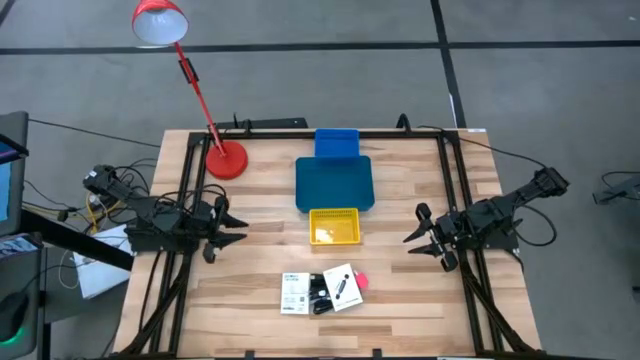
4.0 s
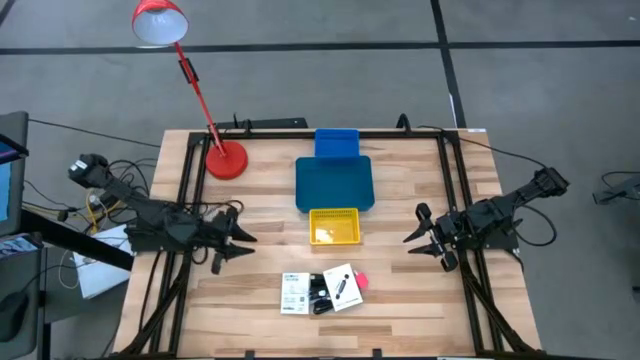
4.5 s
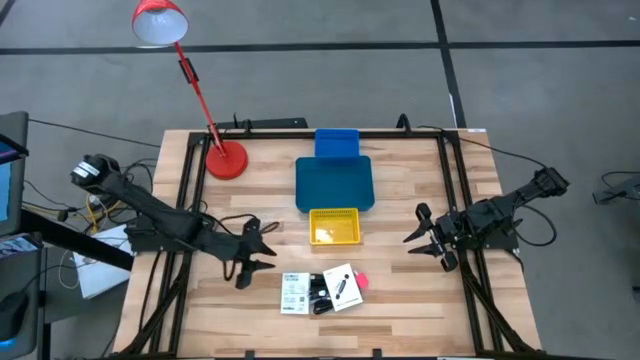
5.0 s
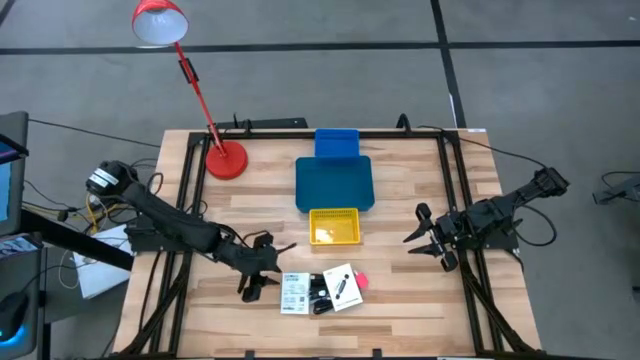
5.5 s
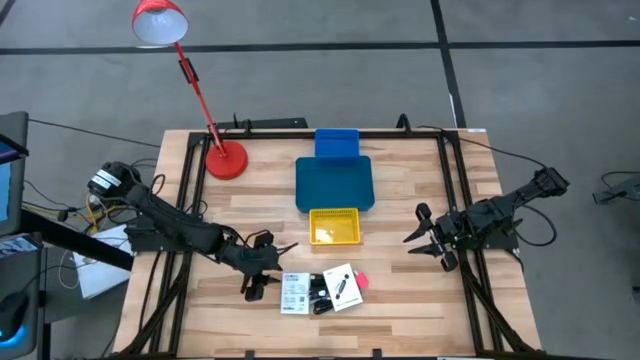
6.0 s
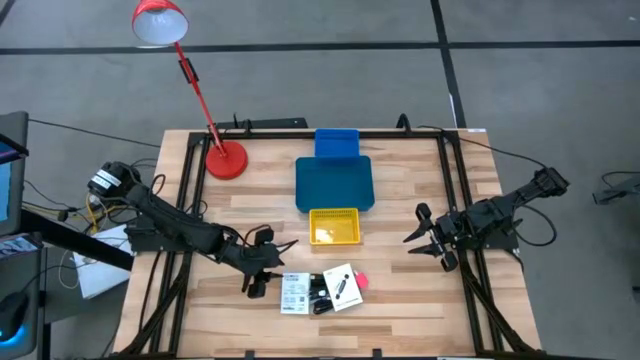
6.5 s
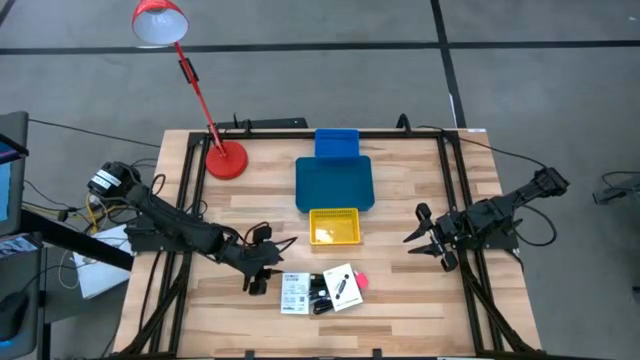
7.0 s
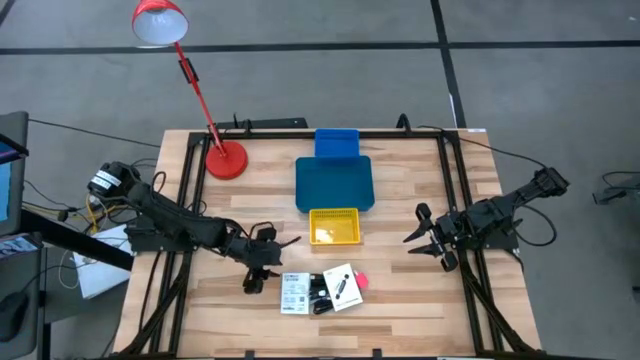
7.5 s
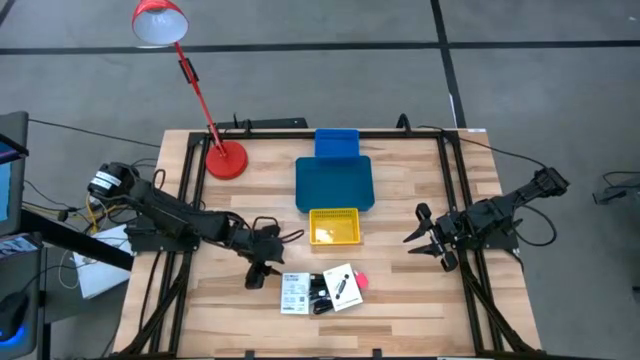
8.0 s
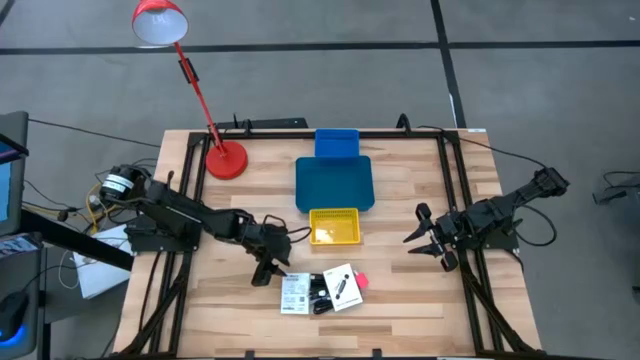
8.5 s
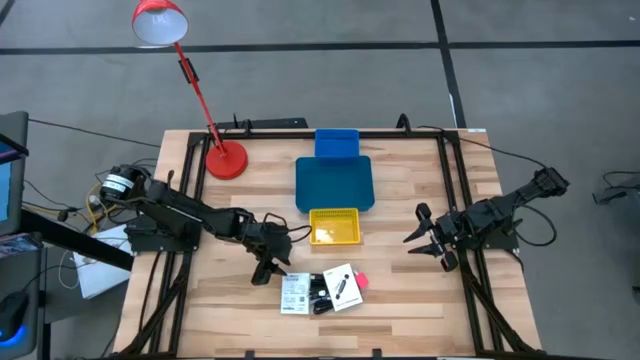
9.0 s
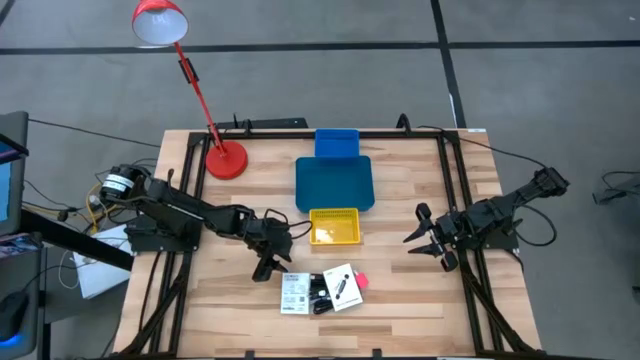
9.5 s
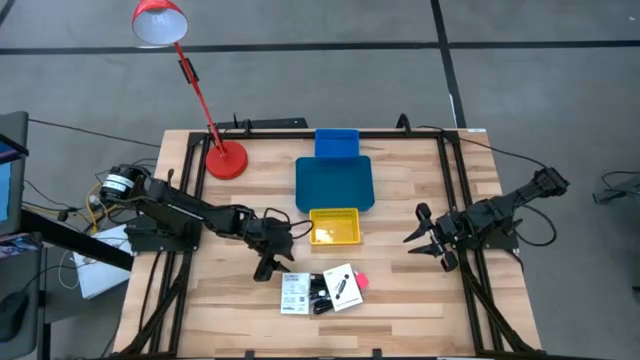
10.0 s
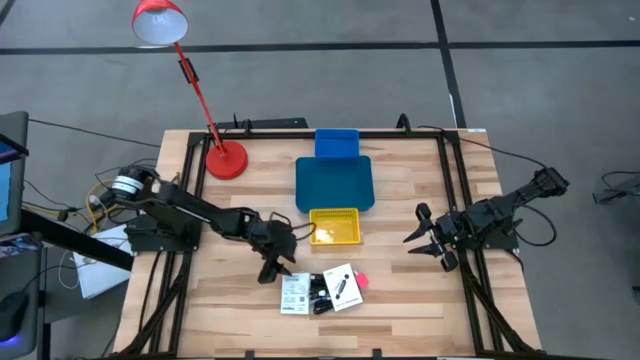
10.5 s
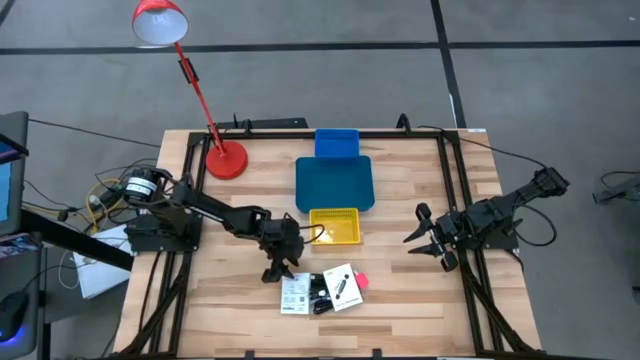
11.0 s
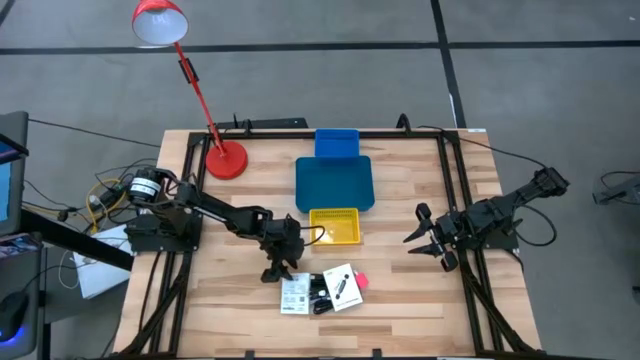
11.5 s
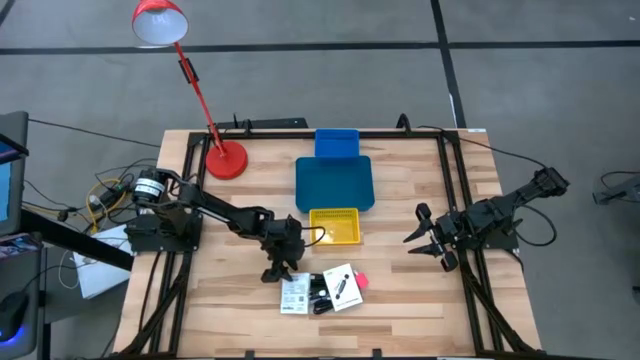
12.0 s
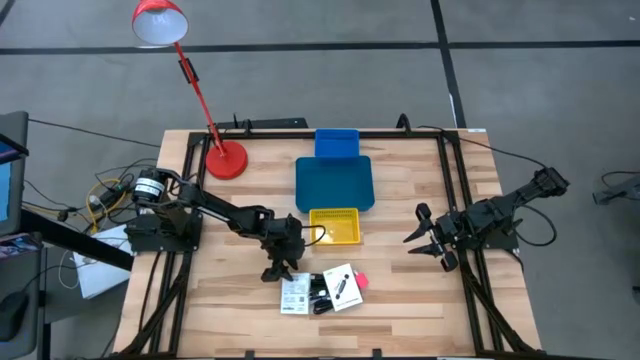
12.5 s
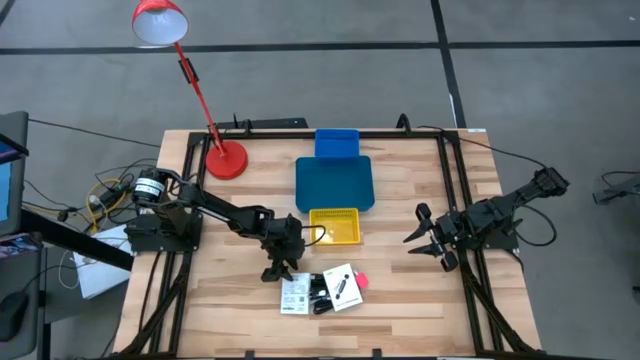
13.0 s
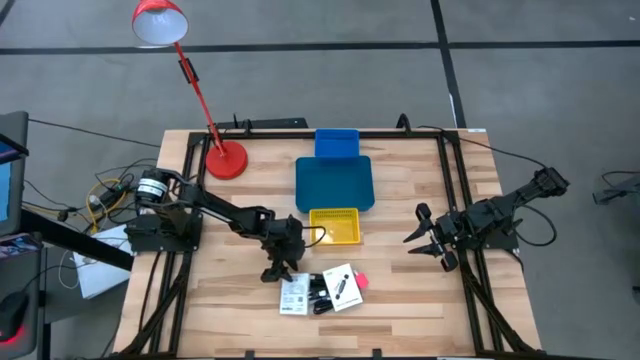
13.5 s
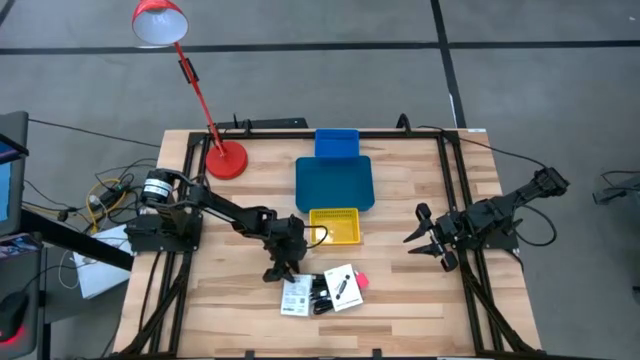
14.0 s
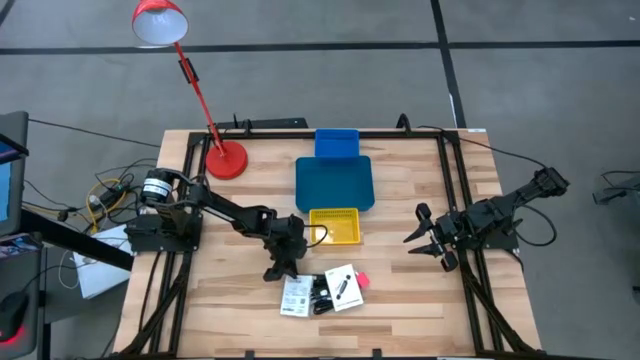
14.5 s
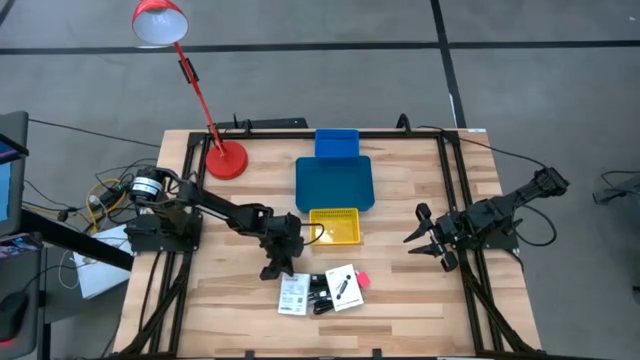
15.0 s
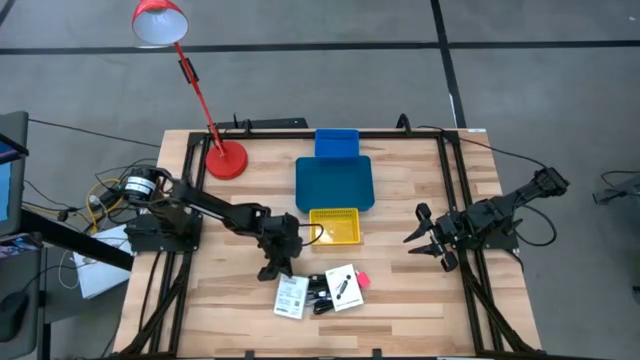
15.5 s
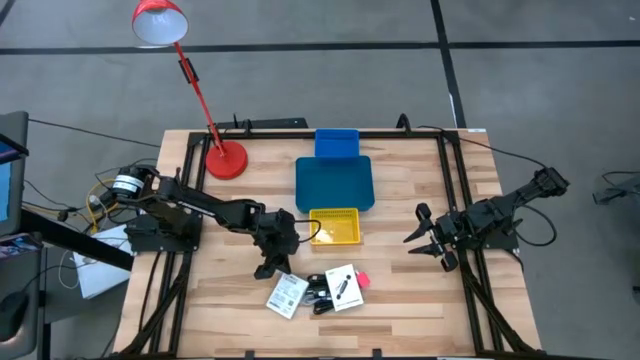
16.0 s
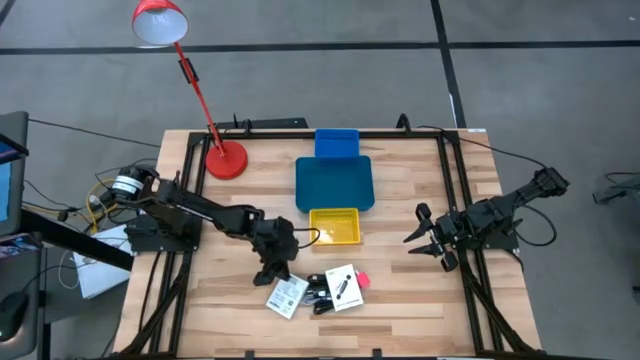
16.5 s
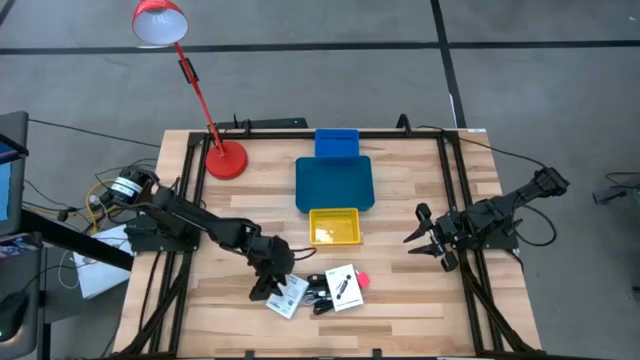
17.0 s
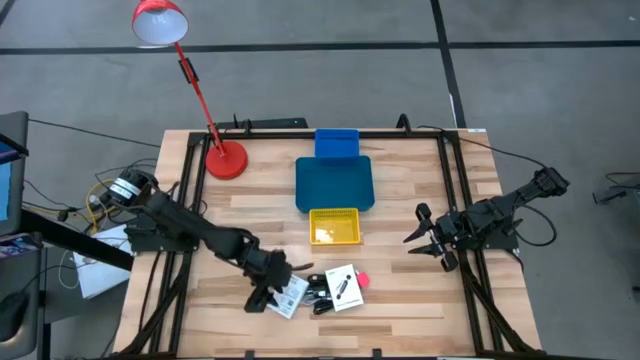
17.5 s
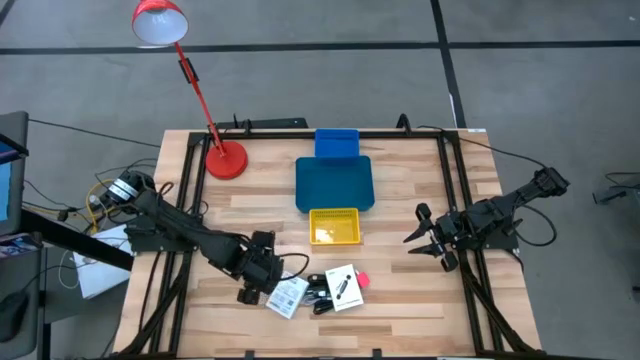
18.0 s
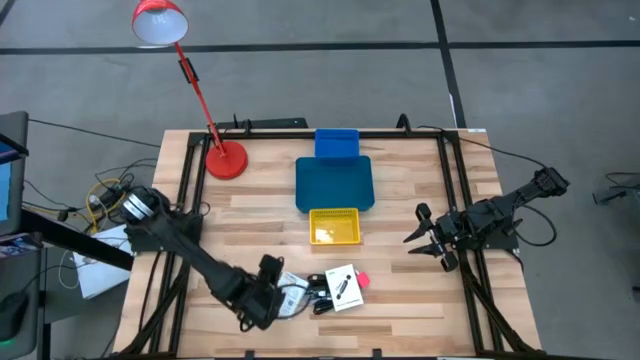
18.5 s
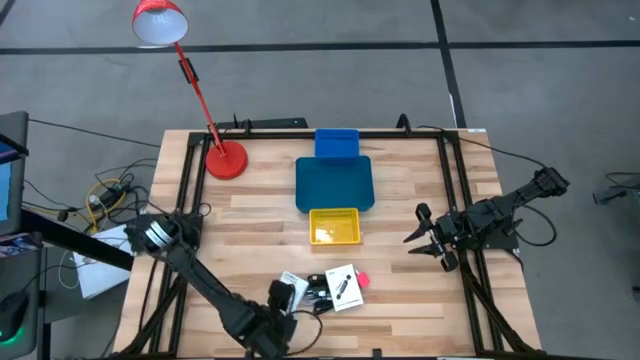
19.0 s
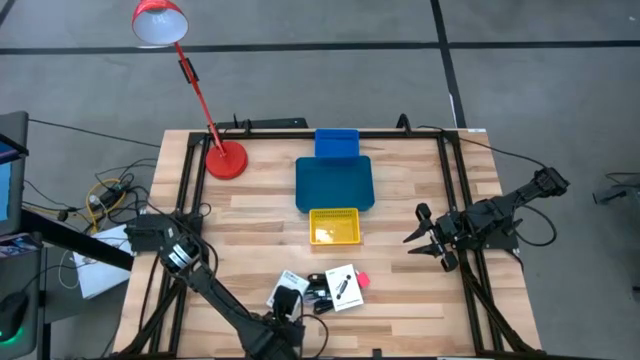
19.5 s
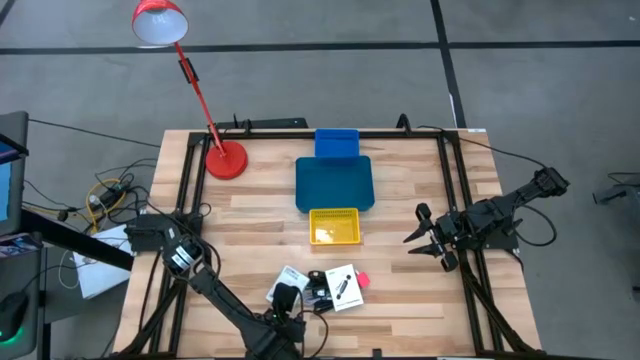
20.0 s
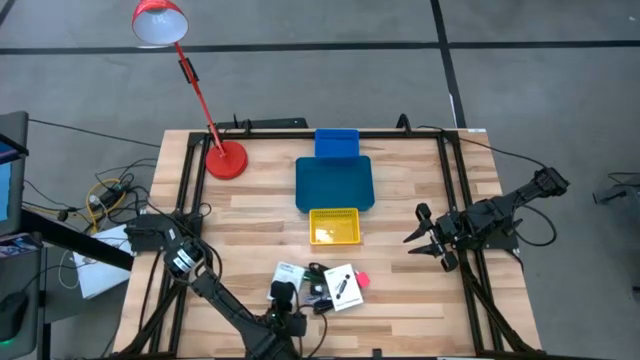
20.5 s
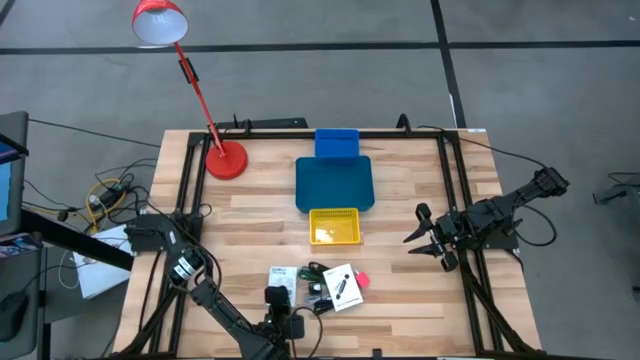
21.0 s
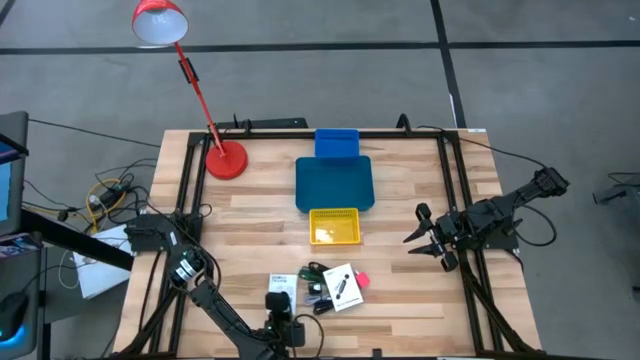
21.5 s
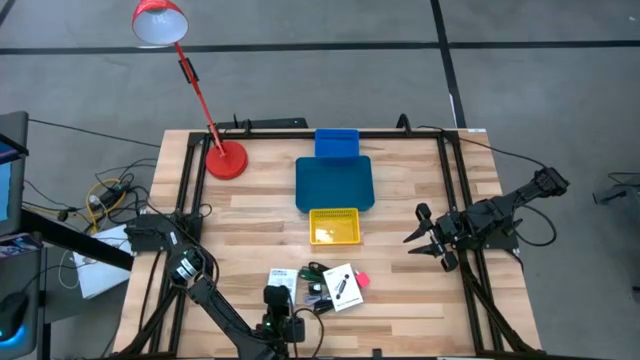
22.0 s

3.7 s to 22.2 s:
Task: Pick and place items into bin
Put the left white card reader box into the yellow basket

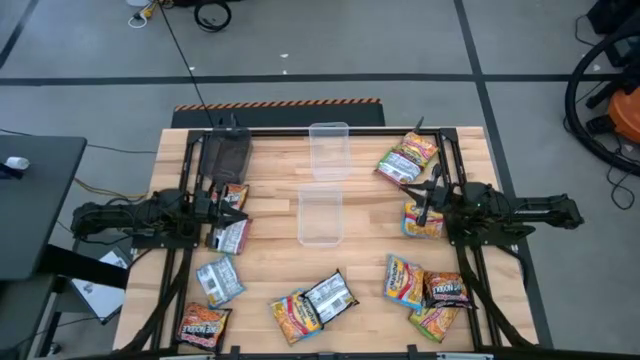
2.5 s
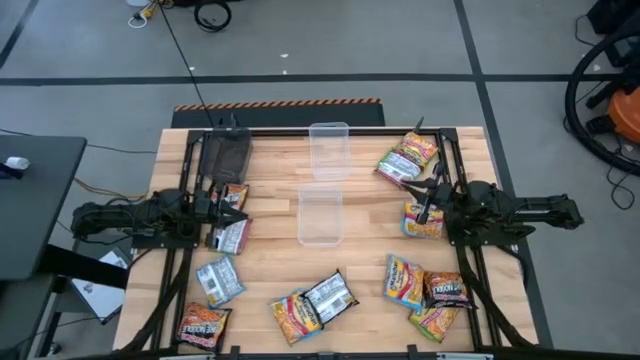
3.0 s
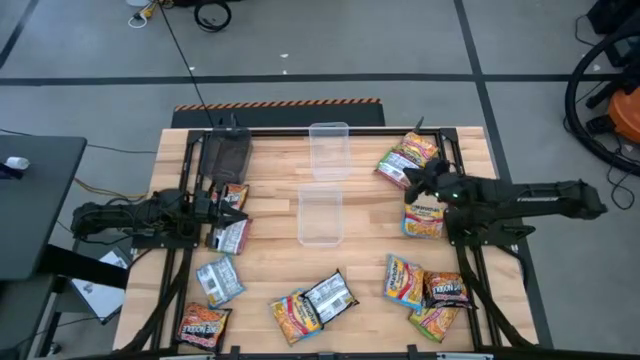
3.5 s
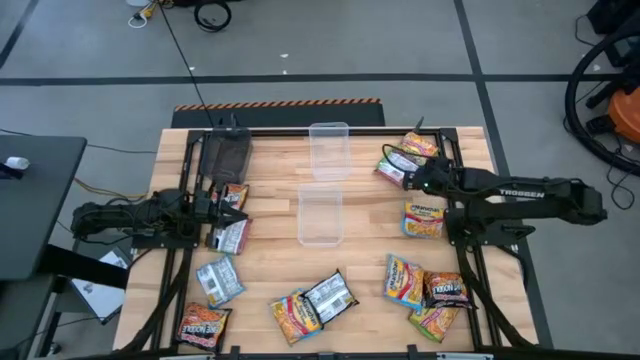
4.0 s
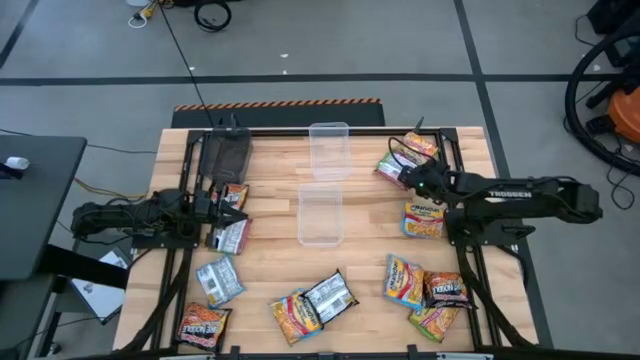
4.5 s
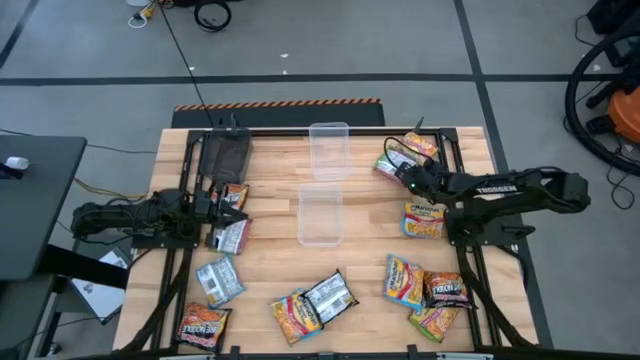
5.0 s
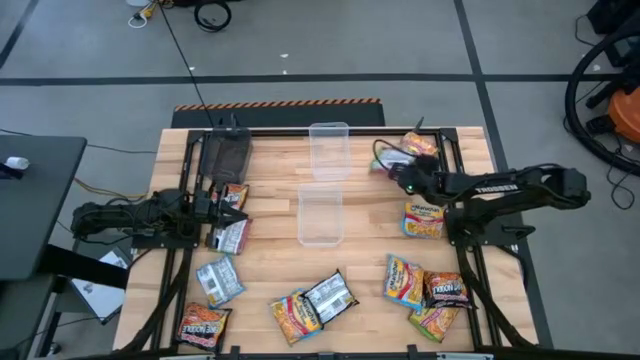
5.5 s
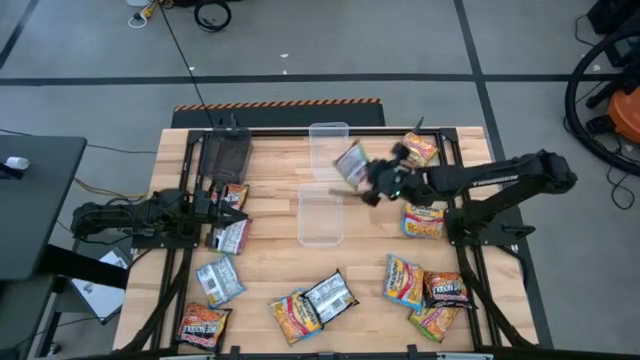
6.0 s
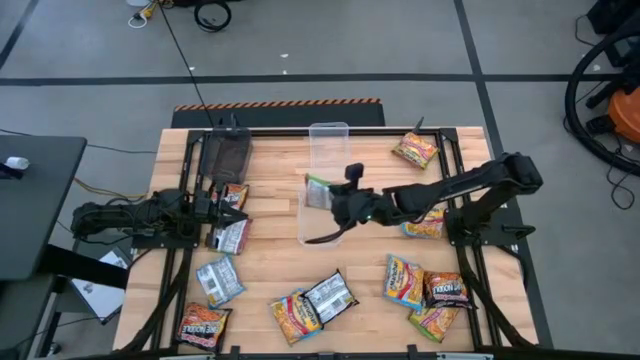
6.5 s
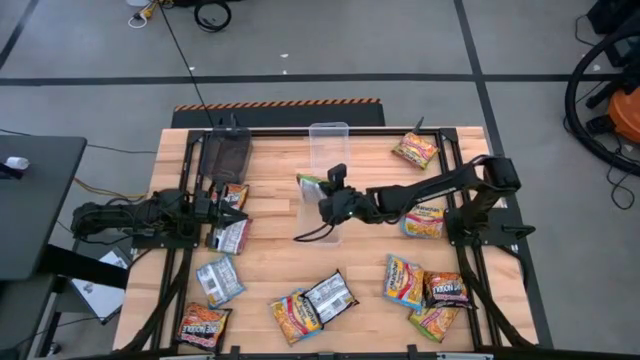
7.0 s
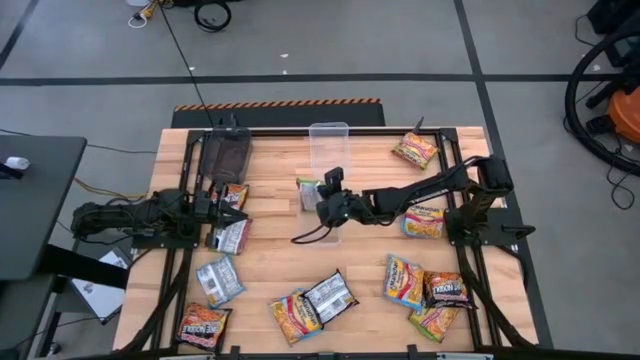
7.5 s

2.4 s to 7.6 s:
Task: Sort Maruchan noodles
Put the green noodle pack into the bottom transparent bin
